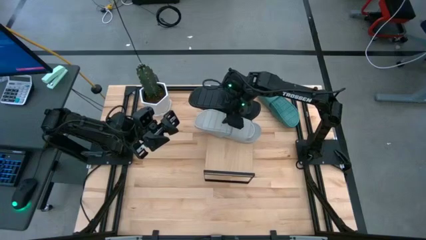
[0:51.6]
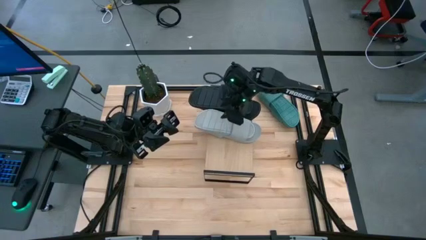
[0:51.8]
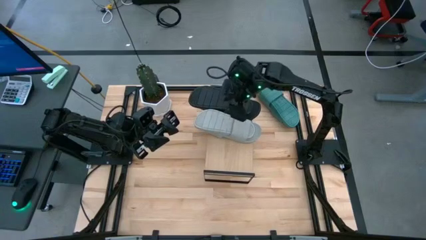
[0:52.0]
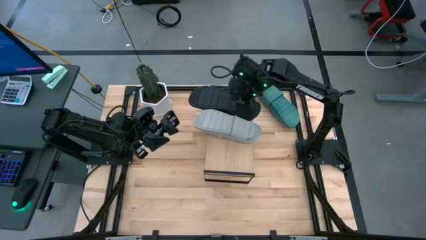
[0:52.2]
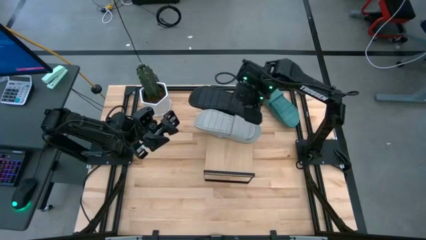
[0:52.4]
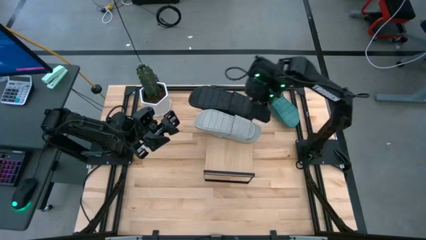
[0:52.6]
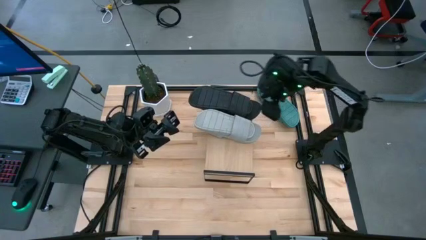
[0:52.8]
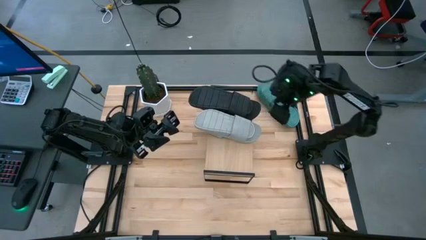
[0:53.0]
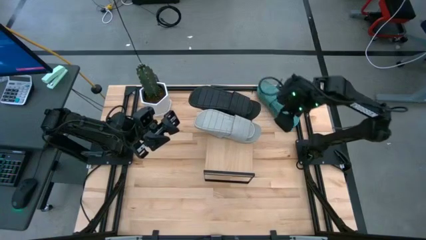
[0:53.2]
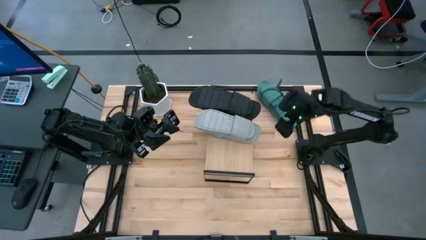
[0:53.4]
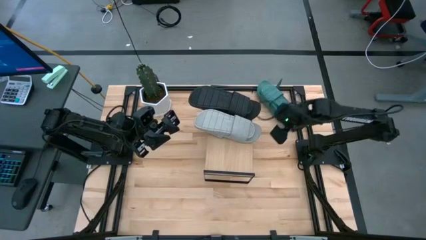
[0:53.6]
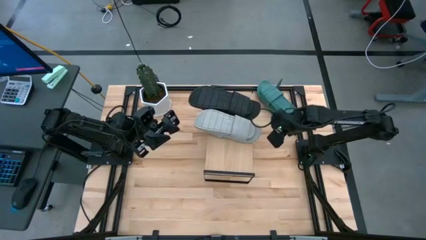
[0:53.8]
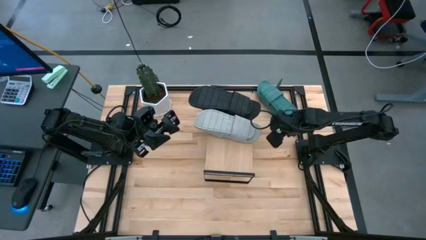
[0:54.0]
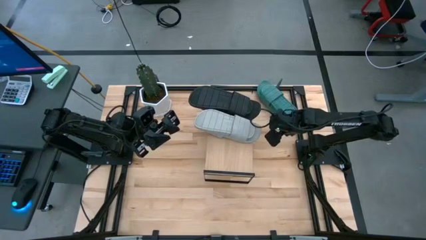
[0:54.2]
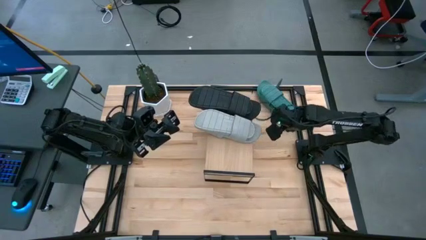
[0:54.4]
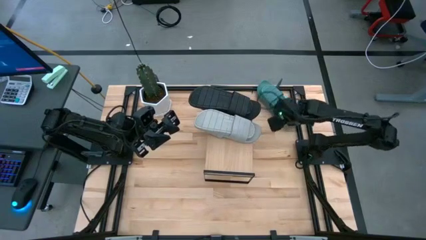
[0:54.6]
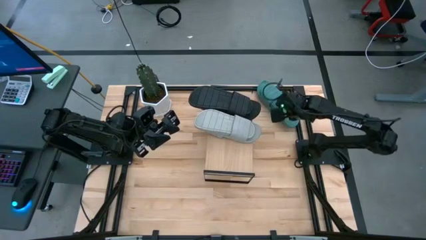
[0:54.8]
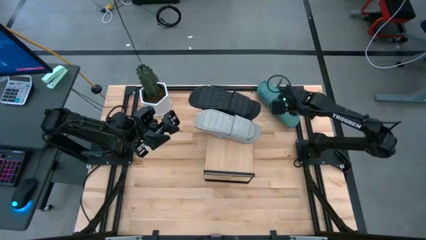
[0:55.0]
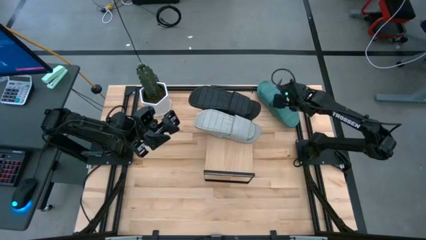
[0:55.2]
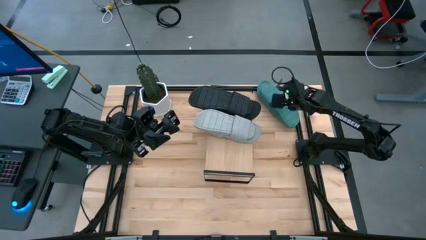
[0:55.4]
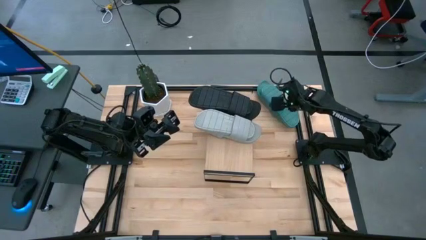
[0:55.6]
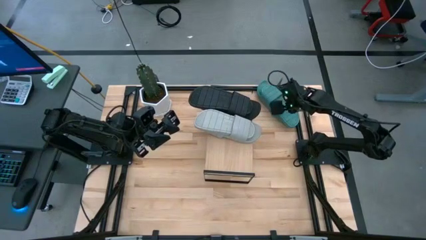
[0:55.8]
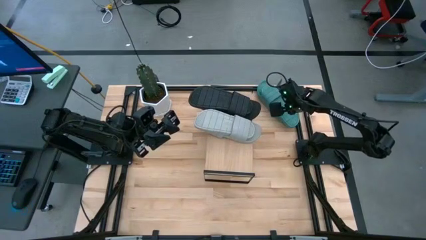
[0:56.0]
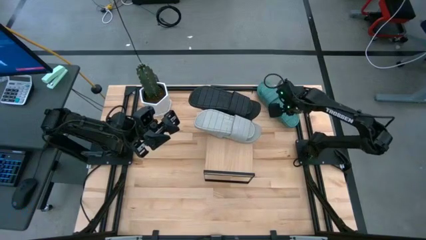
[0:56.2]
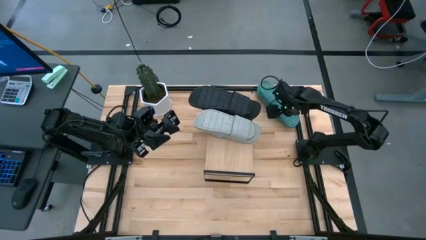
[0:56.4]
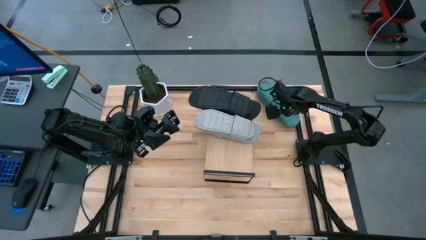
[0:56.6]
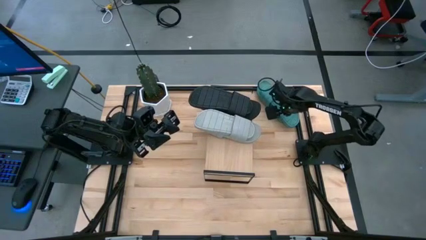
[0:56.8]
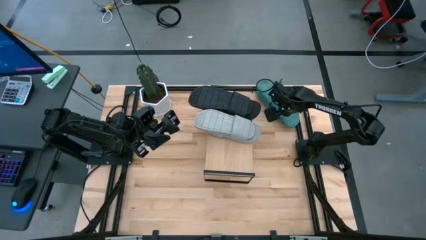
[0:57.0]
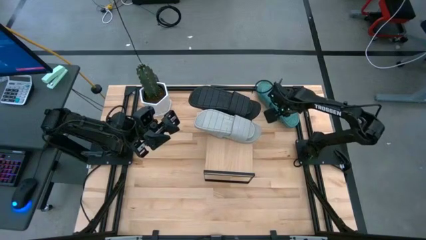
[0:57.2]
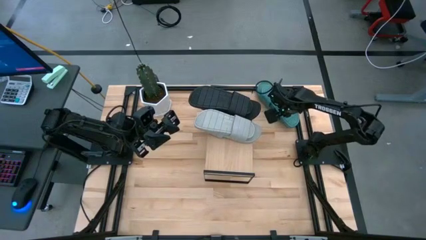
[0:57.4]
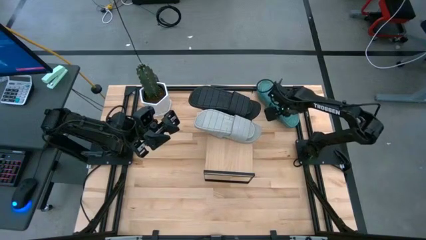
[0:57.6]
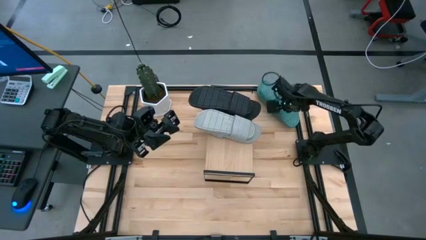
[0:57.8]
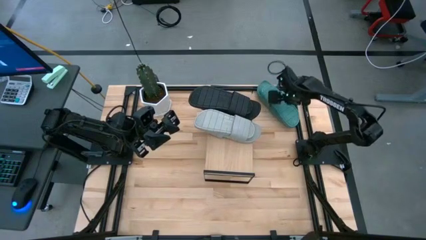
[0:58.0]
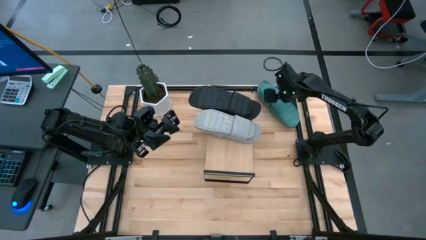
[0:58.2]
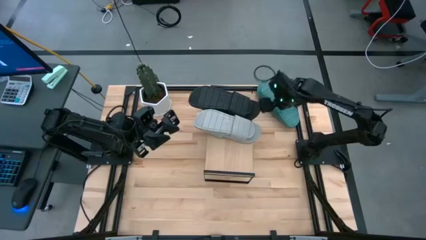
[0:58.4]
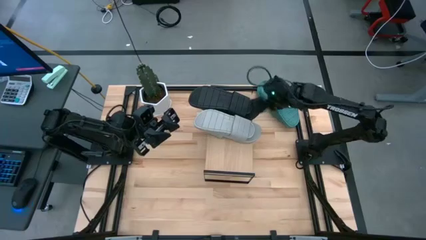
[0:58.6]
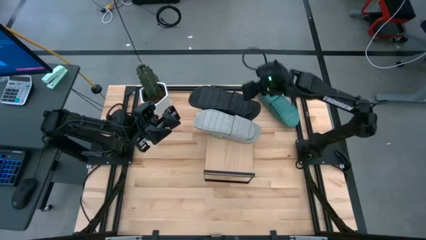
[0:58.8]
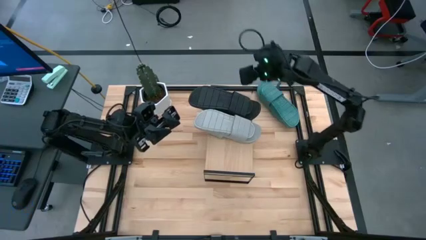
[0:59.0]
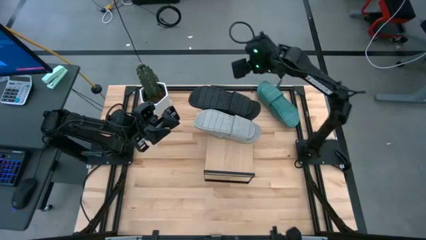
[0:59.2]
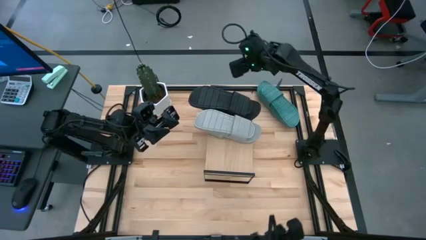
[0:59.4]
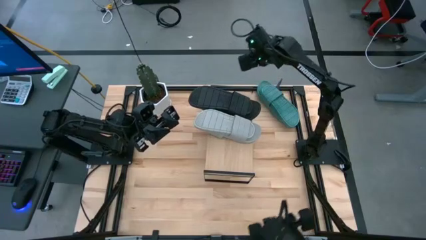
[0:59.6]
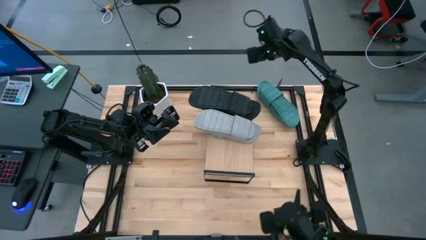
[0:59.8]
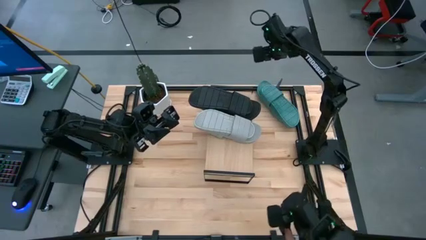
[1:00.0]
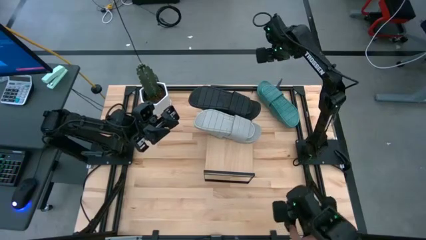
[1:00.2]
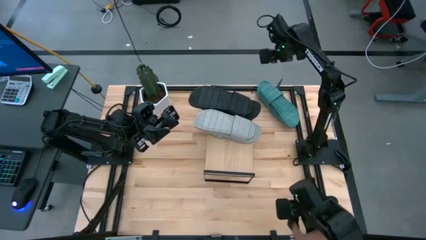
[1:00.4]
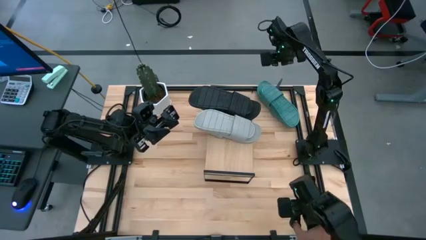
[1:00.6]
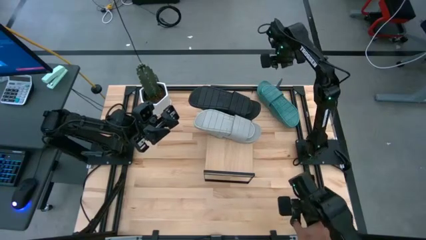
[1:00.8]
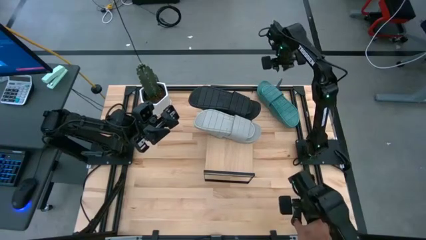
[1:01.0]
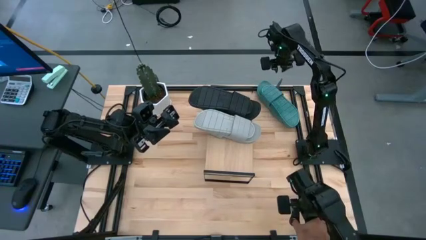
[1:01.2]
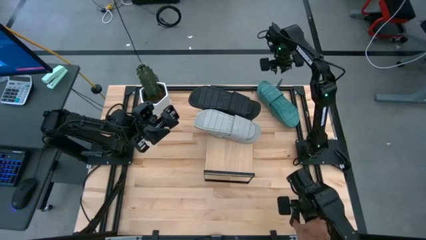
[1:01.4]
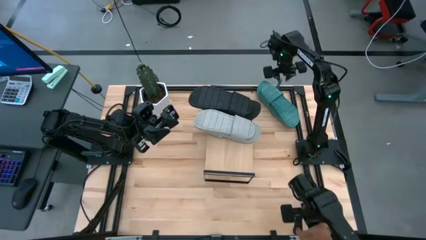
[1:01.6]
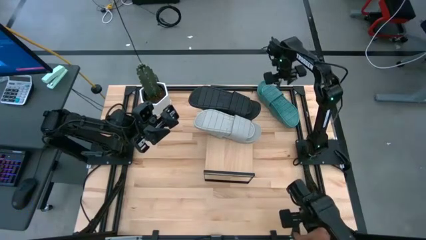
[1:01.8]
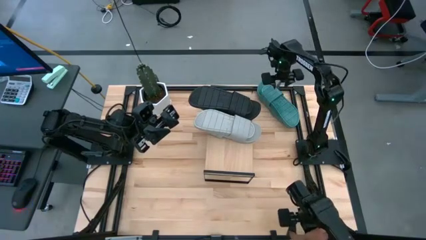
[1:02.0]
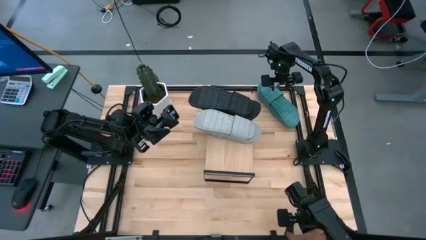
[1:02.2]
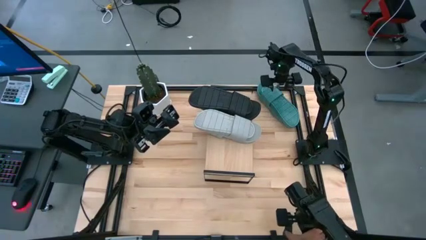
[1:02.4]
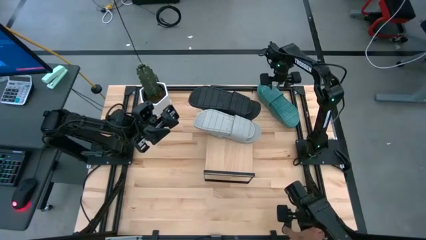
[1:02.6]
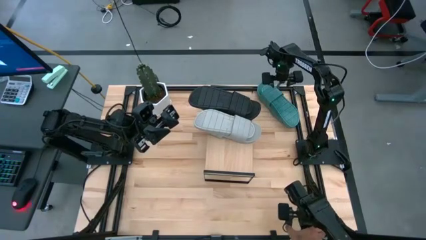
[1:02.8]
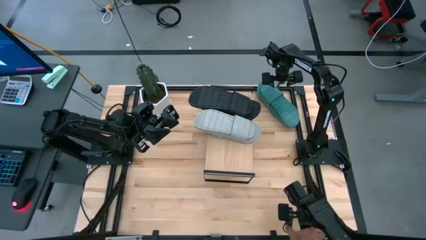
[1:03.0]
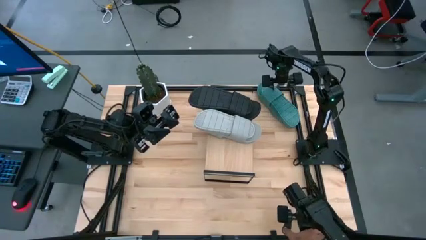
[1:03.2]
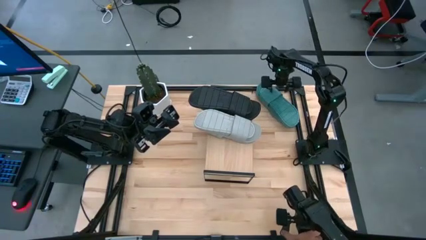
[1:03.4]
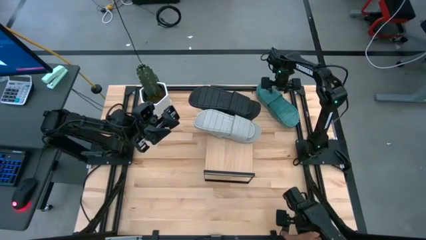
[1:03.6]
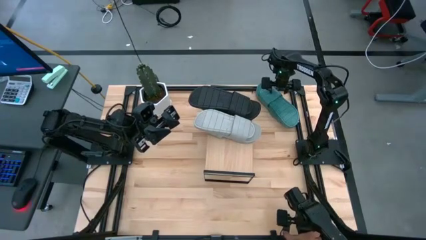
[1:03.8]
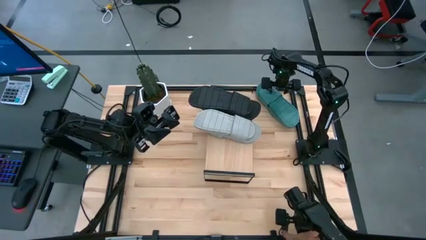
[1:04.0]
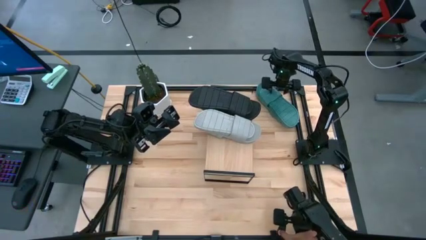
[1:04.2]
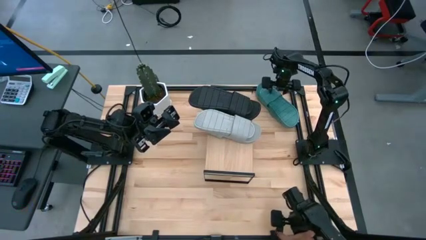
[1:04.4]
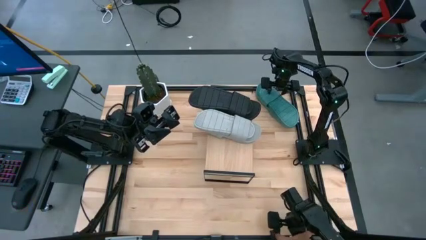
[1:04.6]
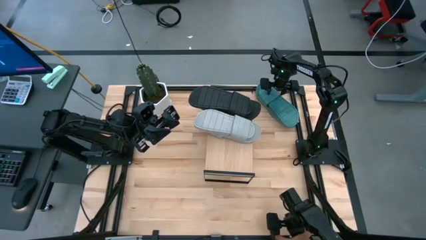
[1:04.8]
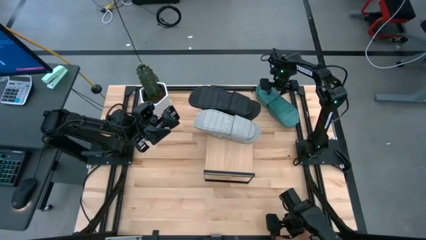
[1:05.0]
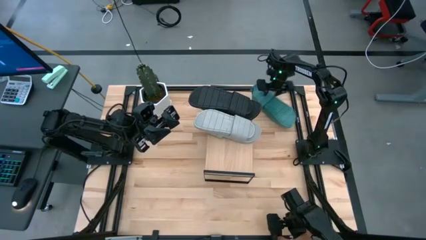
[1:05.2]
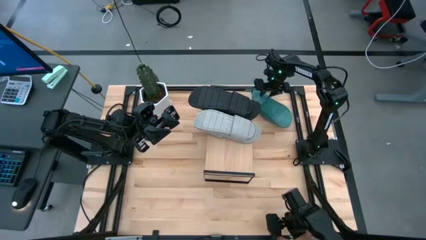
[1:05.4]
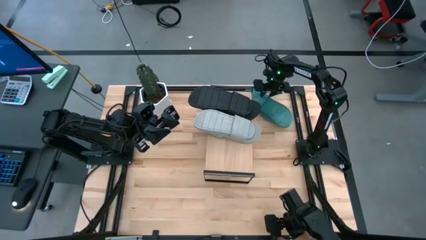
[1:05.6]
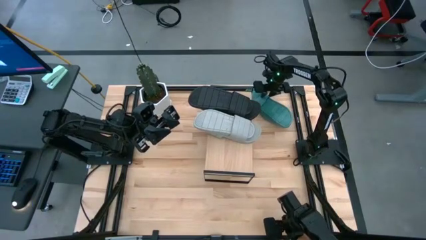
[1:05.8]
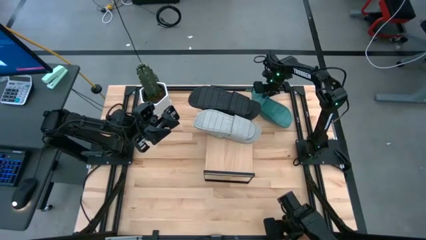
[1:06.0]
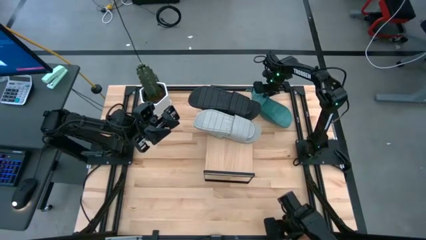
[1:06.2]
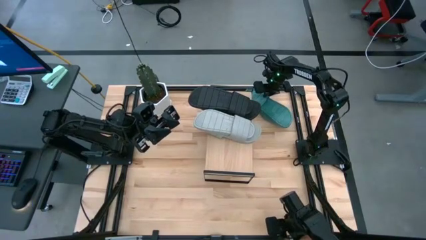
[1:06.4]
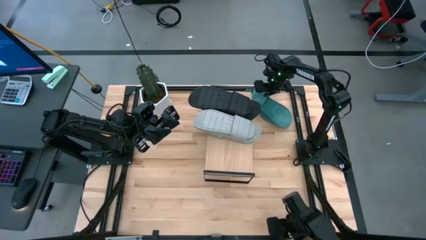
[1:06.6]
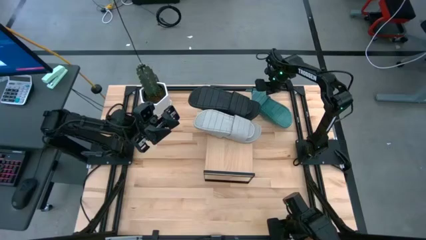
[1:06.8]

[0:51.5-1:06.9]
Task: Pick and place slides into the shelf
Put the green slides on the shelf

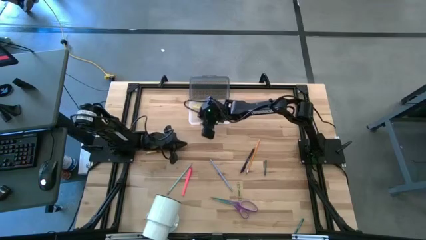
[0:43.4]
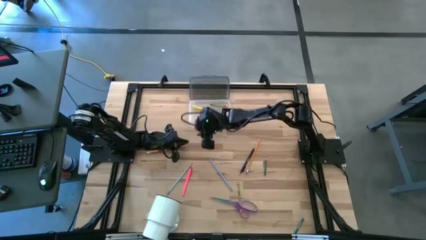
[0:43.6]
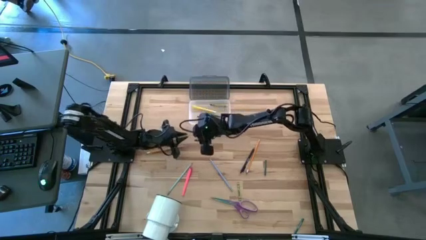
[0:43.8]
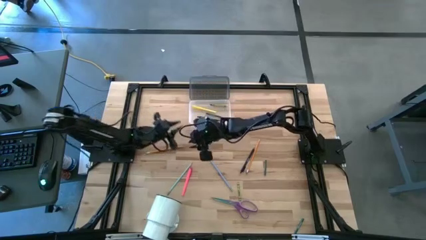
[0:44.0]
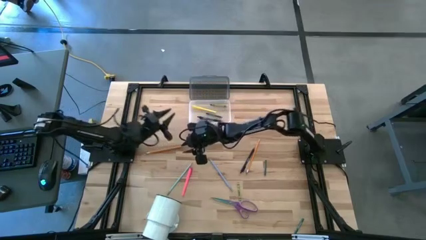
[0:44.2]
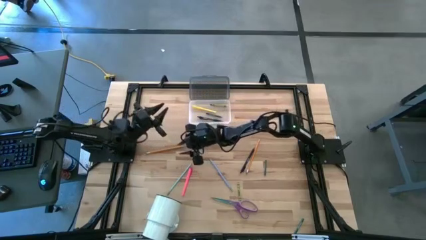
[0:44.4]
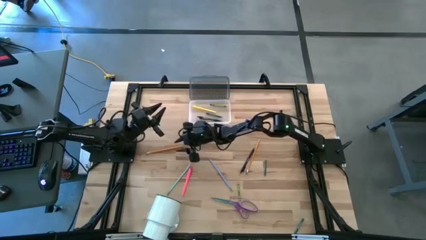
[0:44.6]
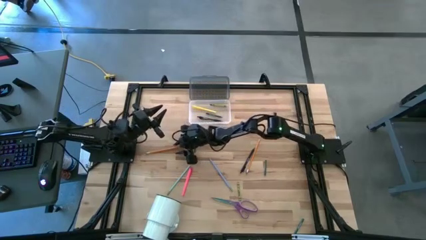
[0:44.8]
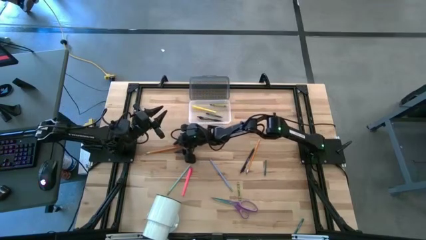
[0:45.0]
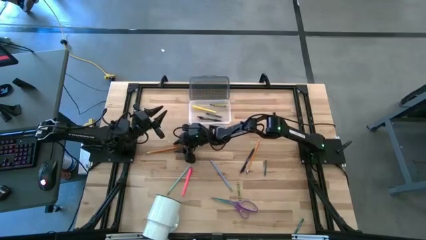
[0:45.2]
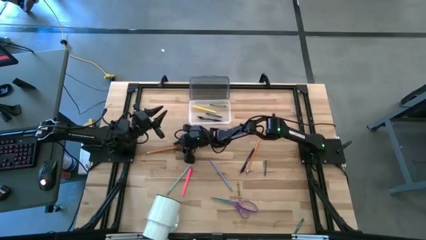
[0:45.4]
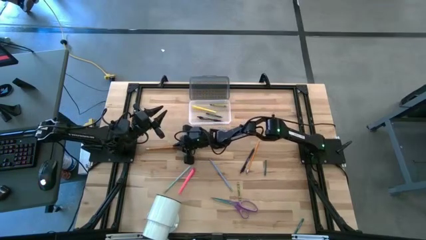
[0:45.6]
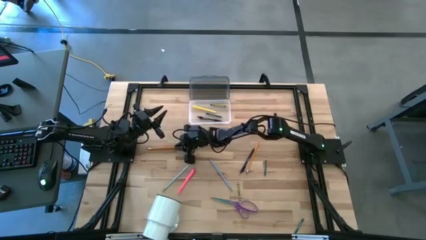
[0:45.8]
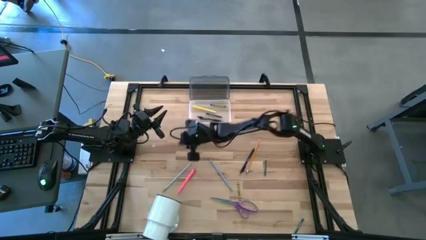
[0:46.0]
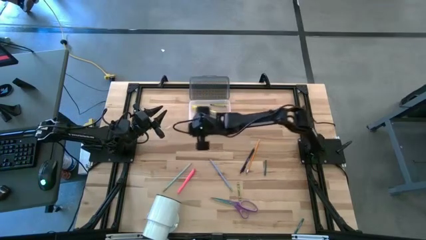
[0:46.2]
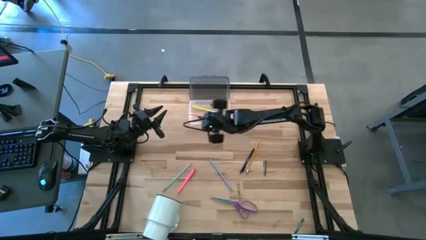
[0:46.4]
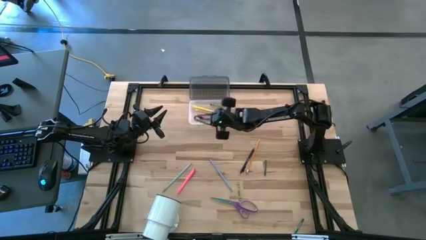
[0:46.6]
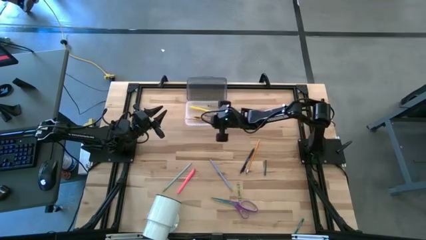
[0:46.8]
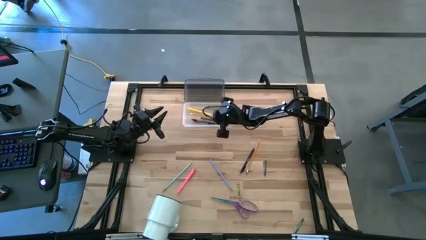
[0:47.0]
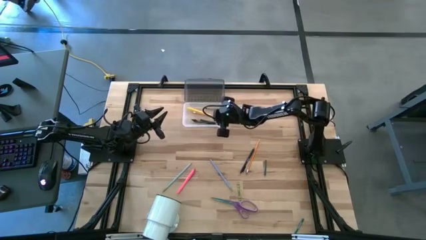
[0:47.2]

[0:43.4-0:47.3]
Task: Pick & place school supplies into a supply box
Put the left orange pencil into the supply box
